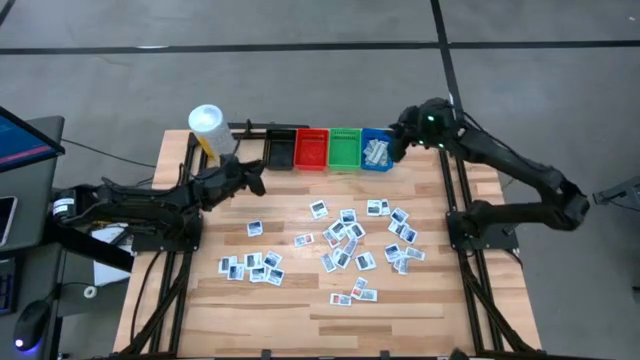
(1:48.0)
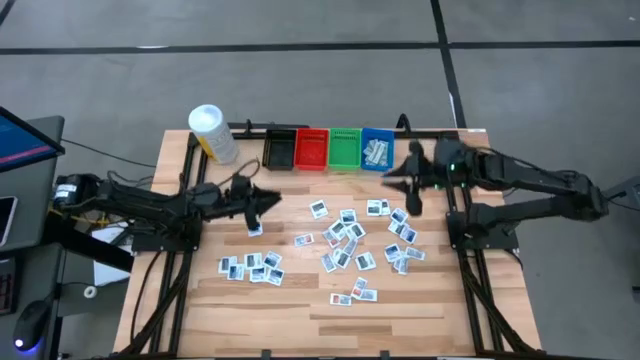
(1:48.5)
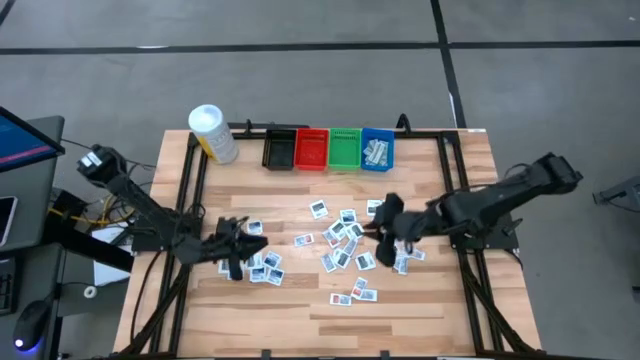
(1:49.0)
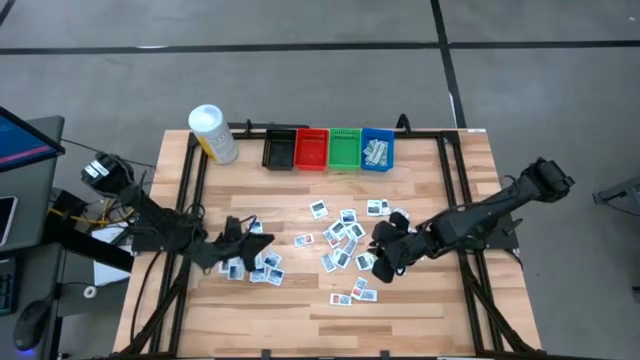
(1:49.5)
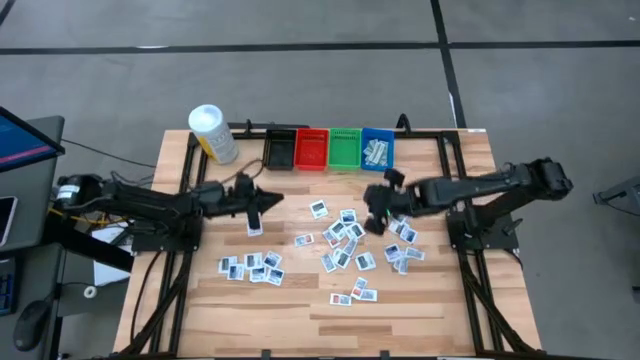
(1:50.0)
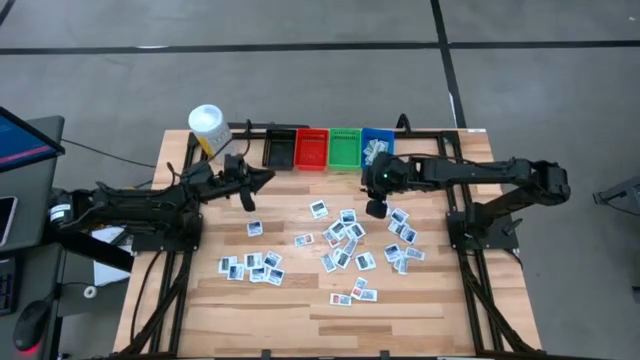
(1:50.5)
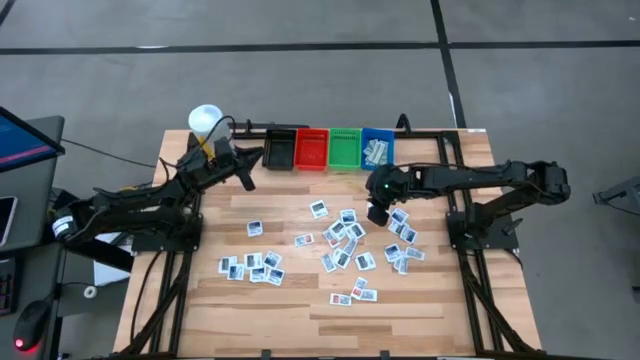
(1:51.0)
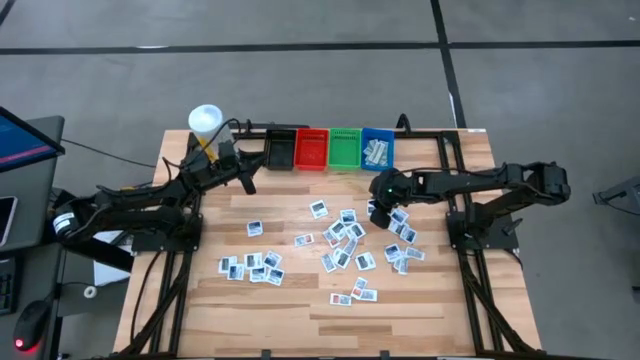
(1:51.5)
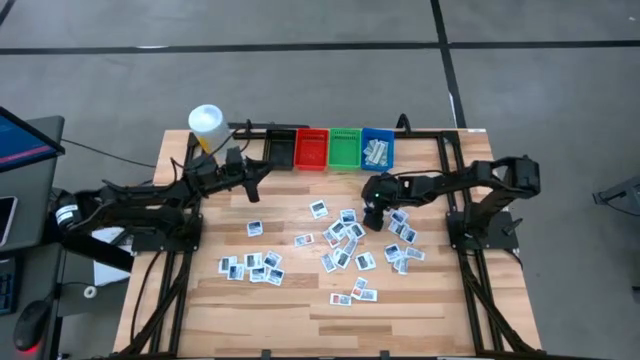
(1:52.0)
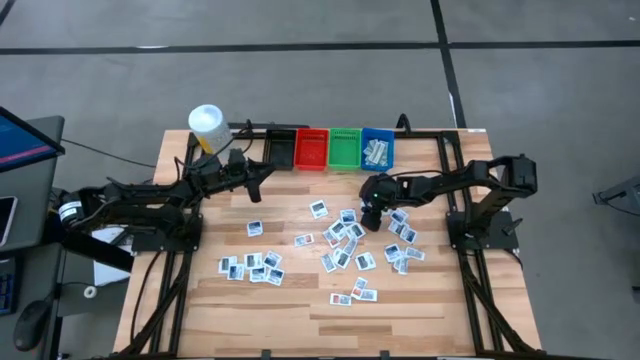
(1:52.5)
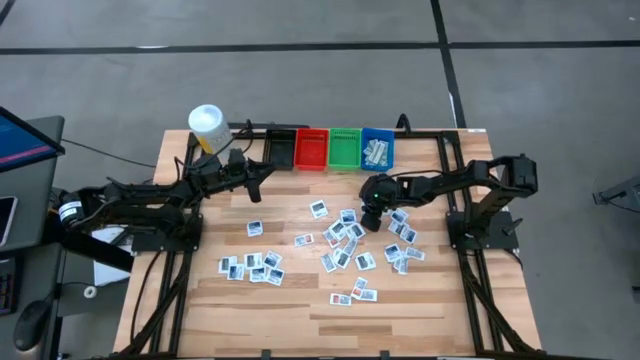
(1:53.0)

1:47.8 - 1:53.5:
Task: Pick & Place First Aid Supplies
Put the towelette pack into the green bin

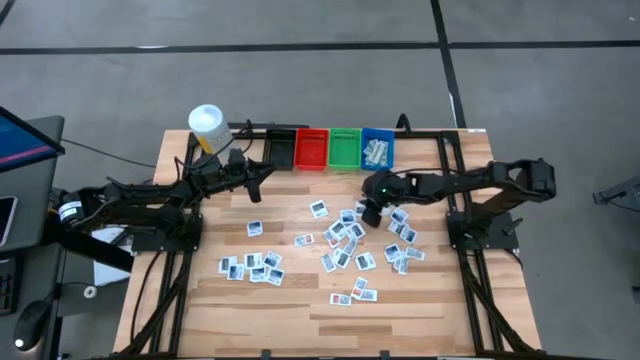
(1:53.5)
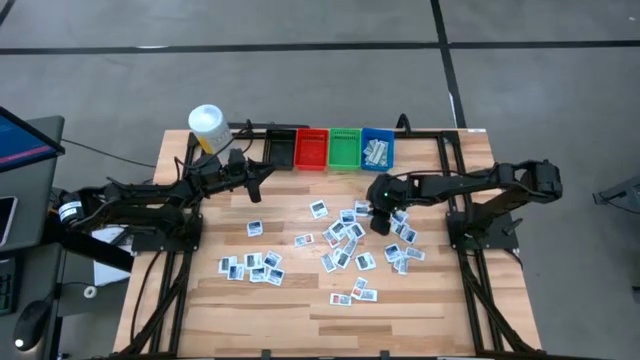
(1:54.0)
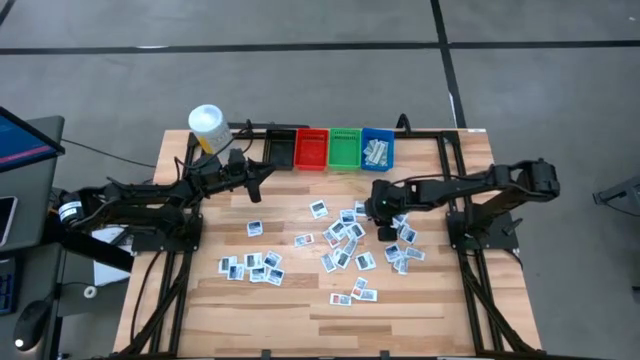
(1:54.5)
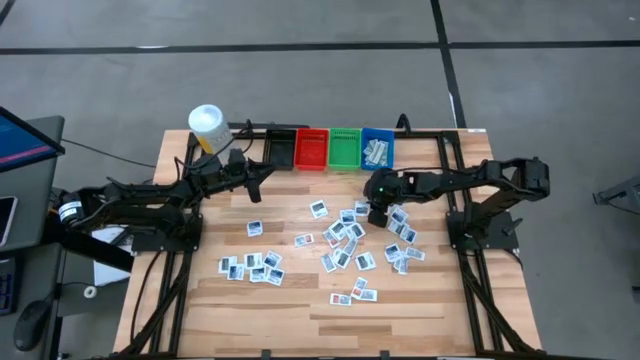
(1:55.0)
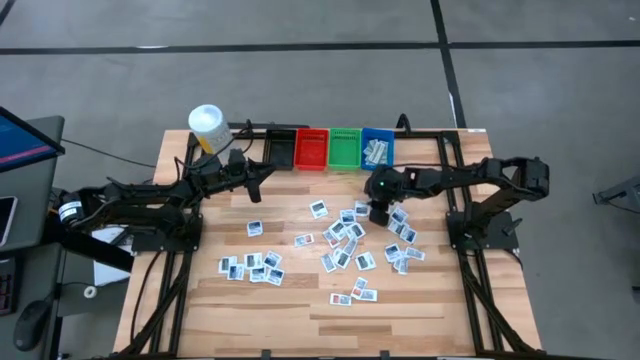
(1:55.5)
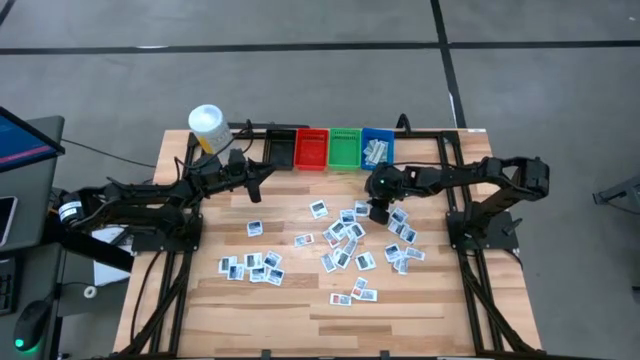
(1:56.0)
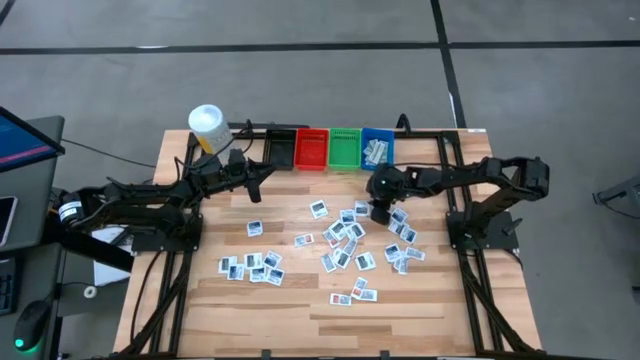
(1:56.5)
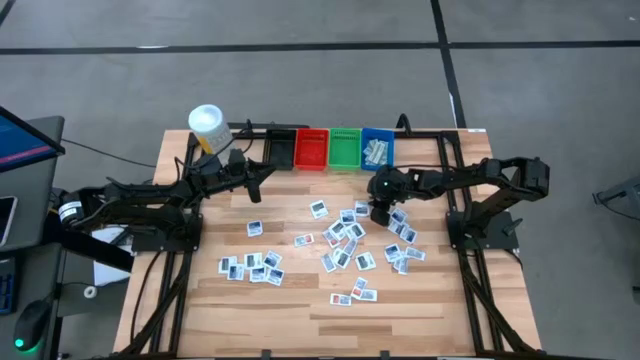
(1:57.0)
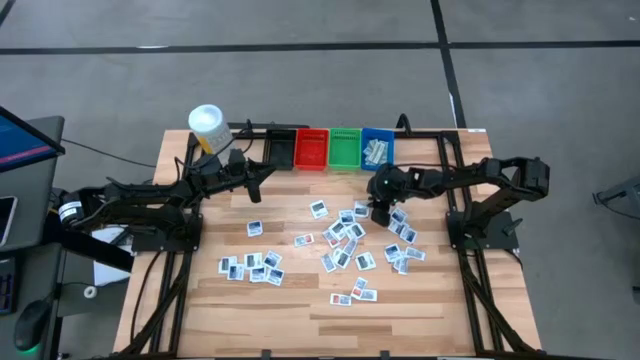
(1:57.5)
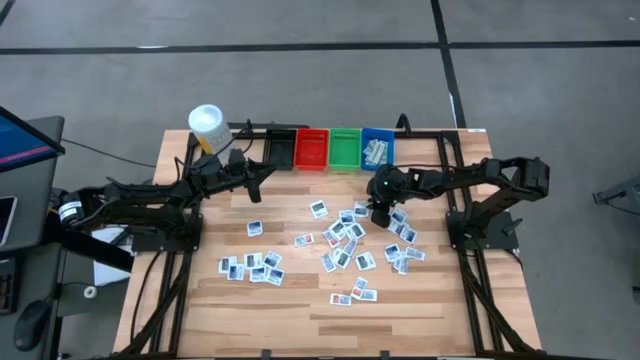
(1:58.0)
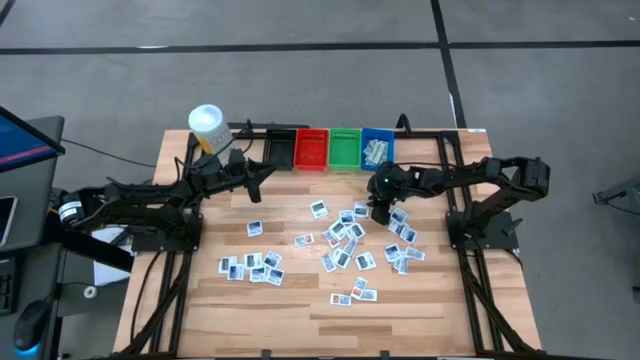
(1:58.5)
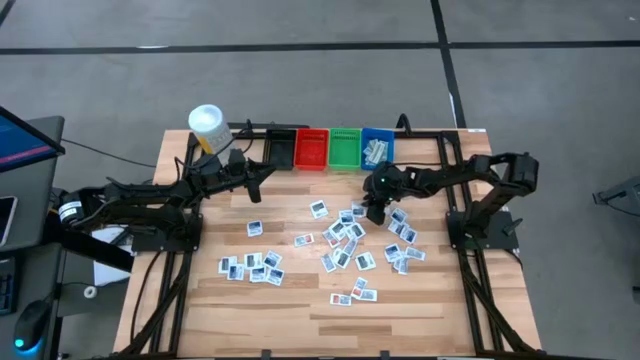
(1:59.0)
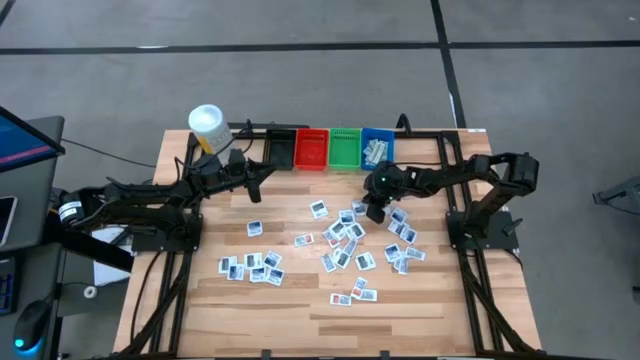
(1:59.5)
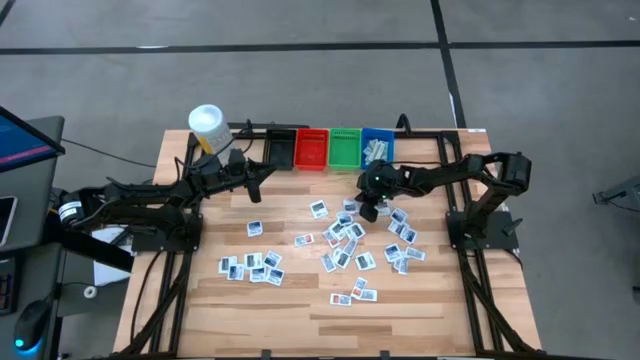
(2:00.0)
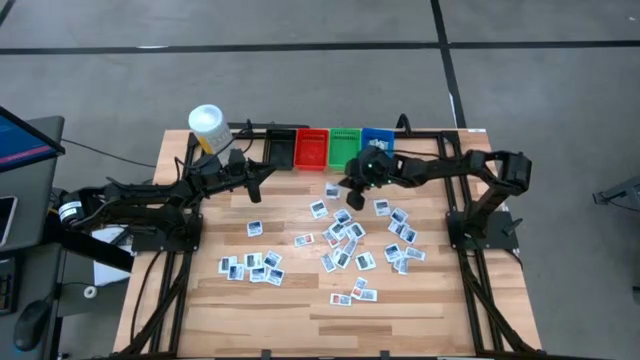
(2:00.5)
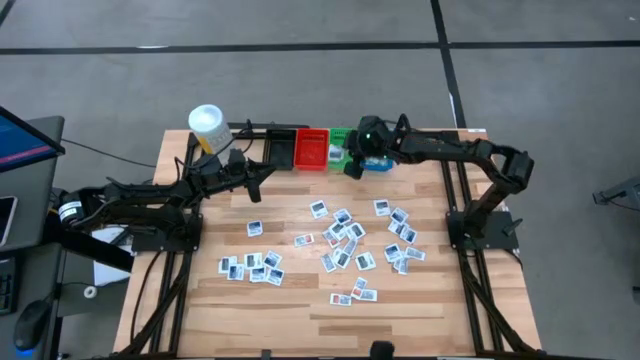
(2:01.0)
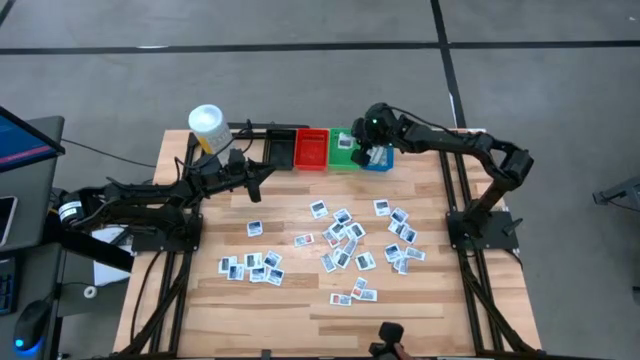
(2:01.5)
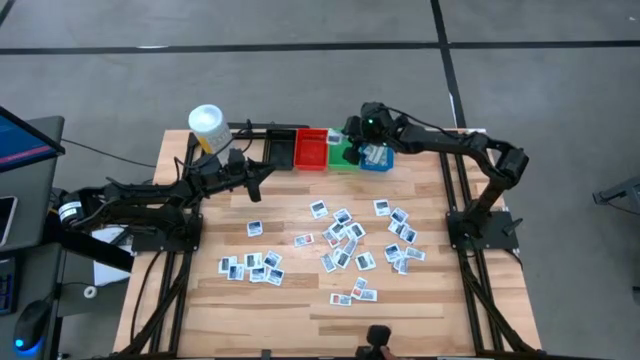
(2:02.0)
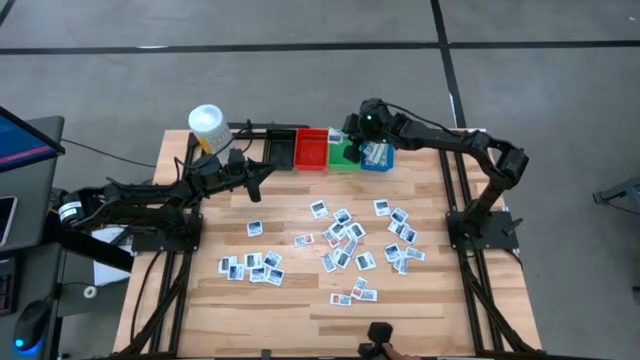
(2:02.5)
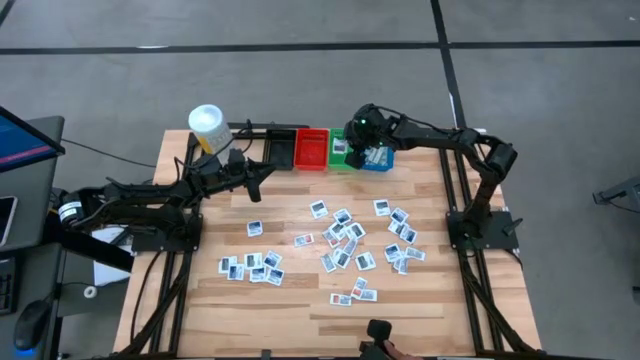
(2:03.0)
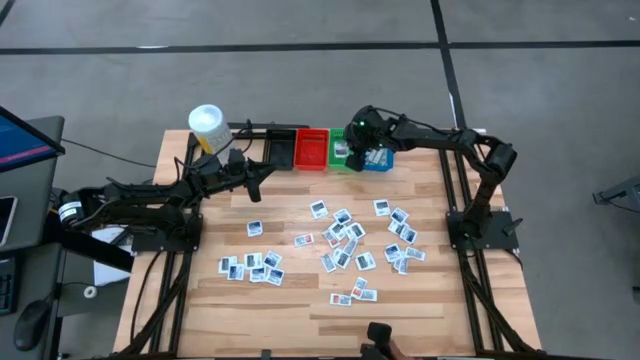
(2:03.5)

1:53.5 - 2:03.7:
Put the towelette pack into the green bin

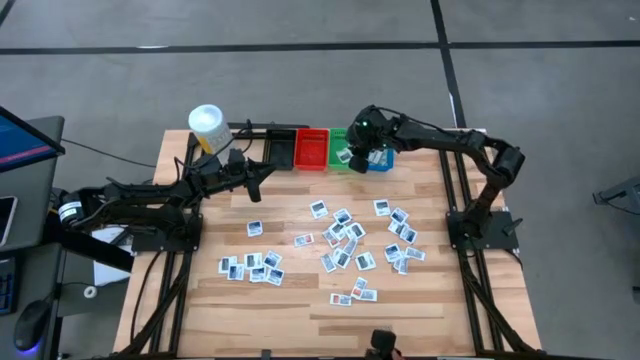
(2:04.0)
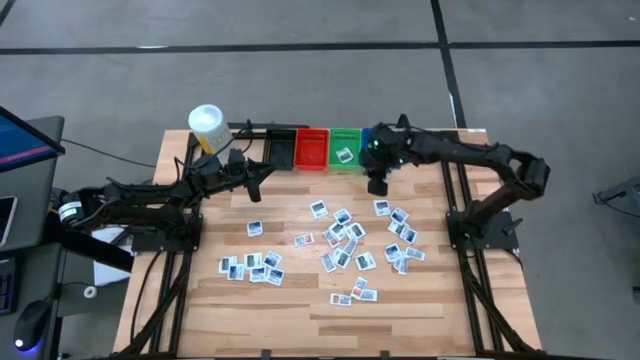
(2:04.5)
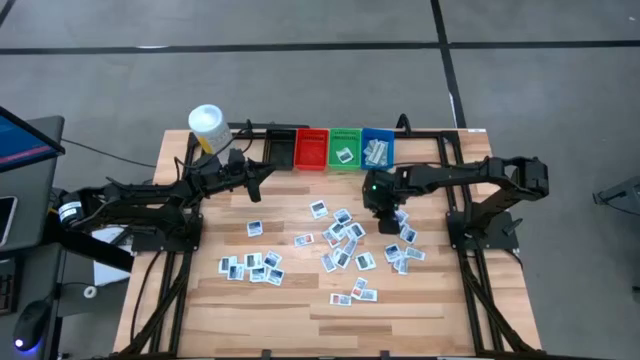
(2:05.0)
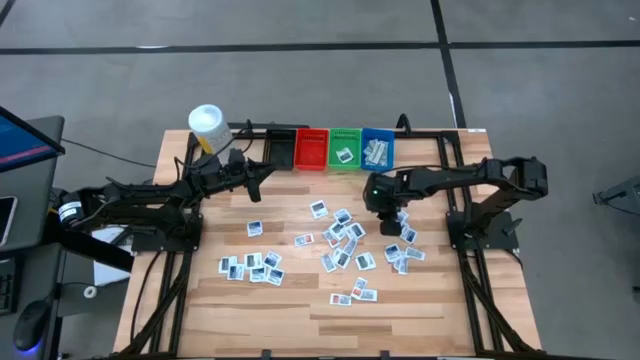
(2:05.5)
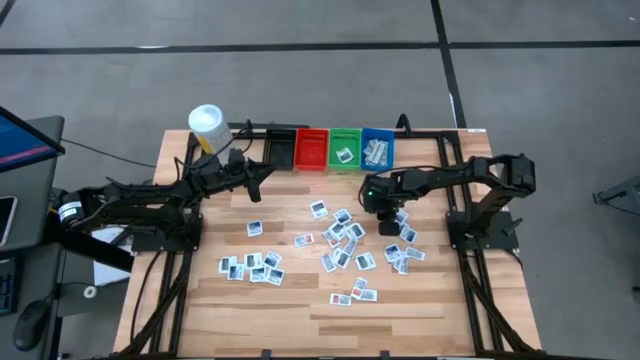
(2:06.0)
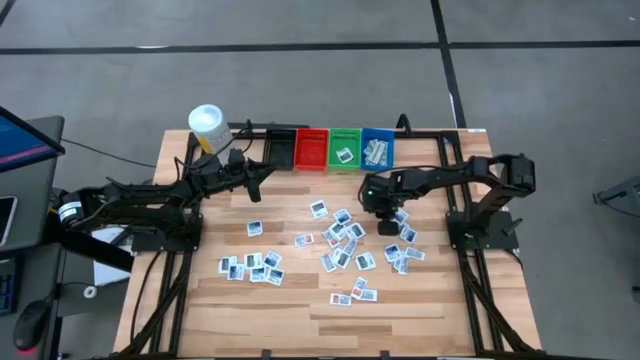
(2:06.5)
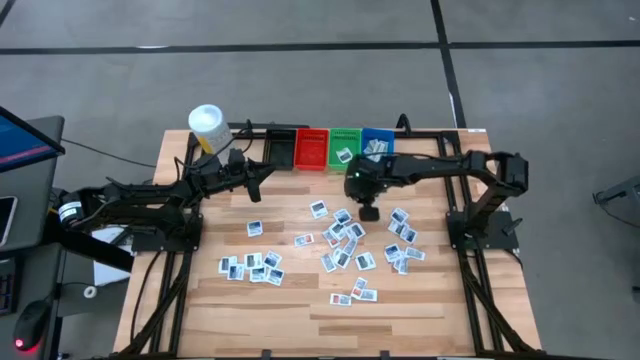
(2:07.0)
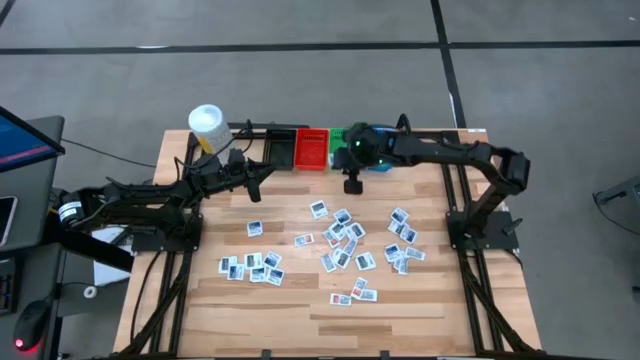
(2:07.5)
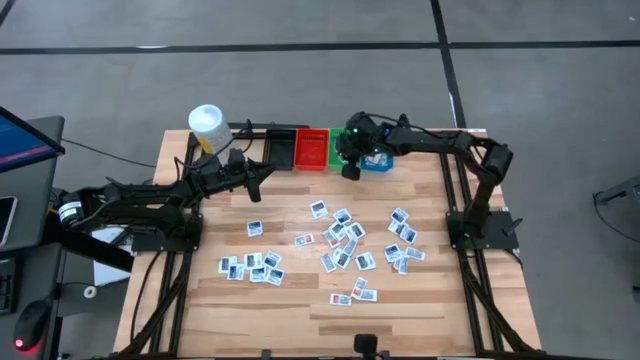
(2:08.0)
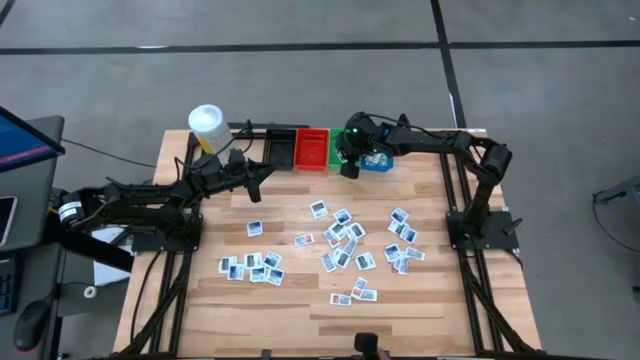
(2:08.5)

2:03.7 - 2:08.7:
Put the towelette pack into the green bin

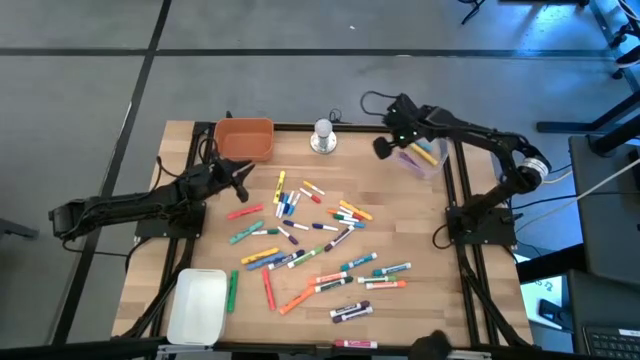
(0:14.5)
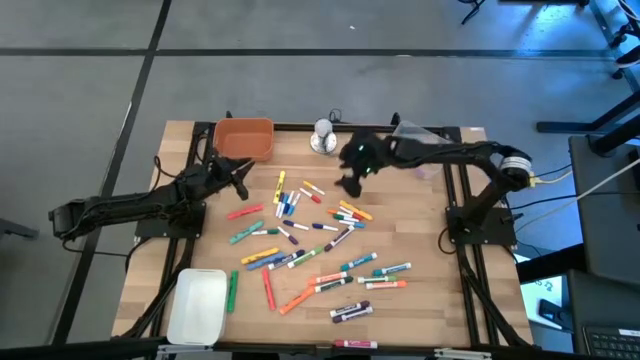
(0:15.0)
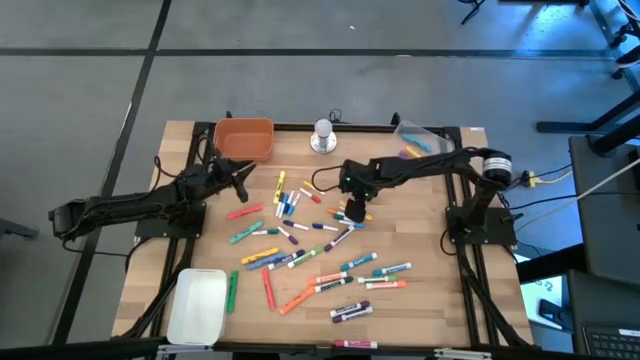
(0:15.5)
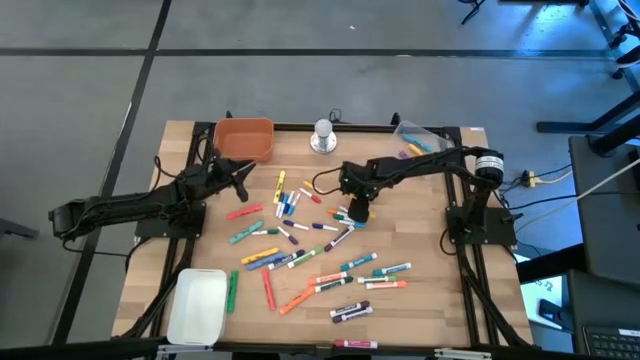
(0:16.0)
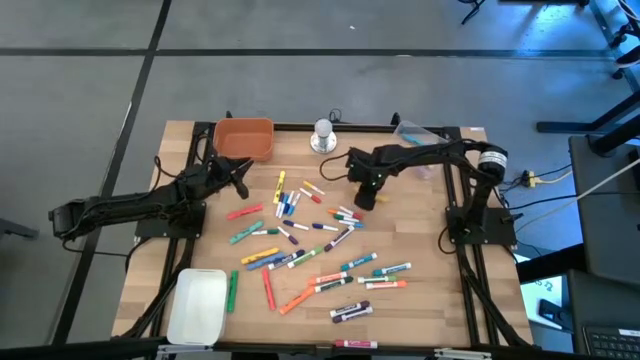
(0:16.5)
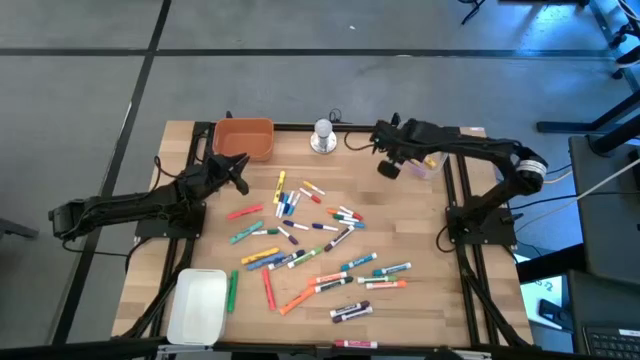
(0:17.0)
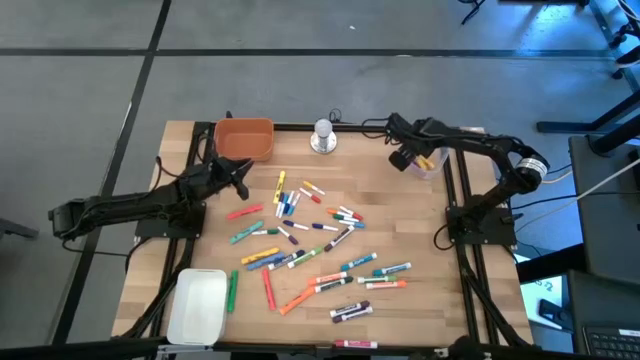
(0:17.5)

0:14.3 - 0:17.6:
Task: Pick & Place Markers
Put the large yellow highlighter pen into the transparent bin
